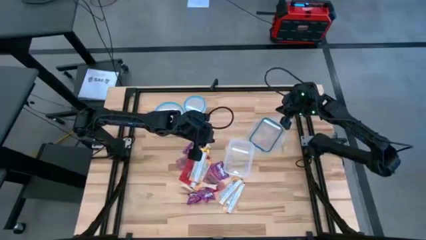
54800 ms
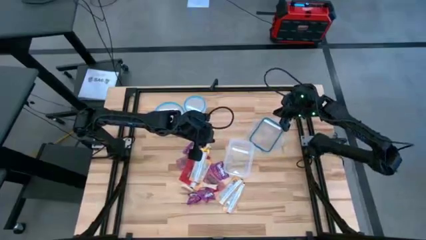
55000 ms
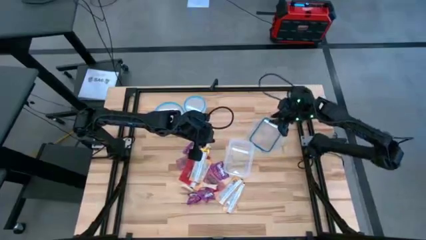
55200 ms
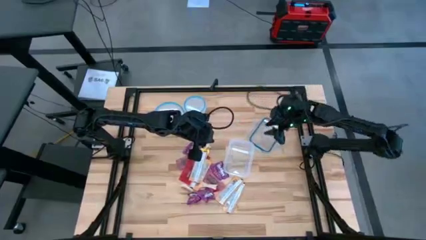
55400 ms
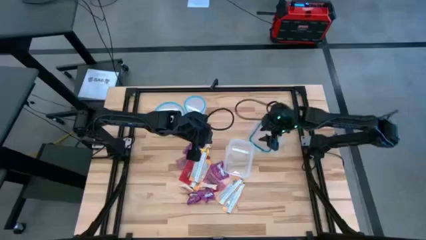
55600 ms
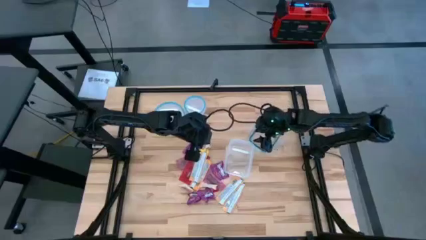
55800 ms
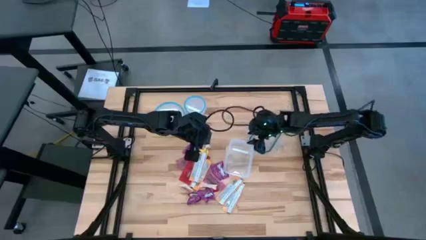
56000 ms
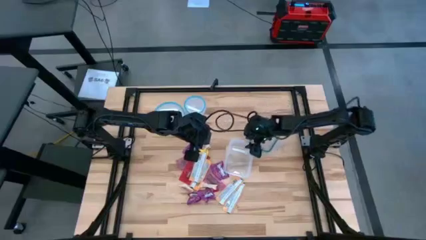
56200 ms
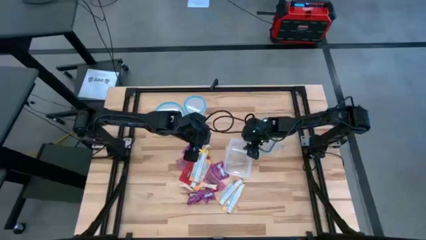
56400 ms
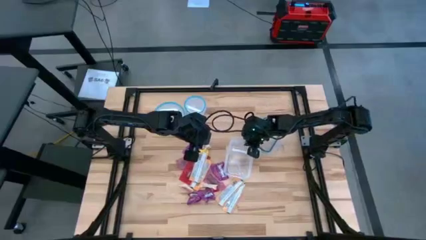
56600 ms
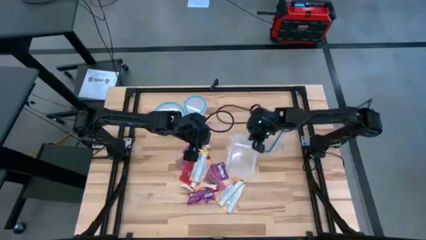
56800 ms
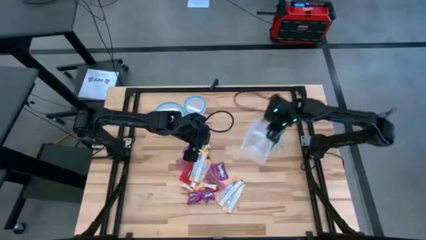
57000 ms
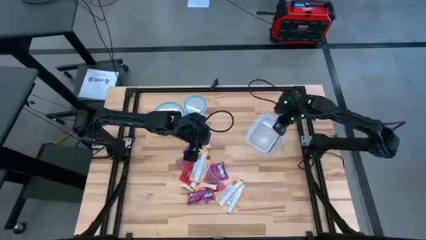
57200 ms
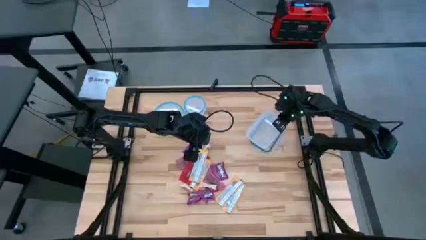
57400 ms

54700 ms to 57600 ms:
Task: Sort candy
Put the rectangular transparent bin on top of its lid

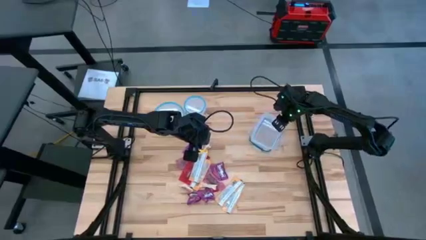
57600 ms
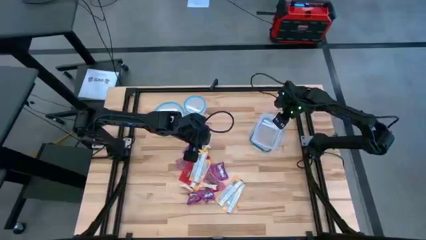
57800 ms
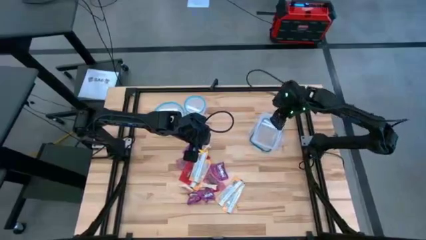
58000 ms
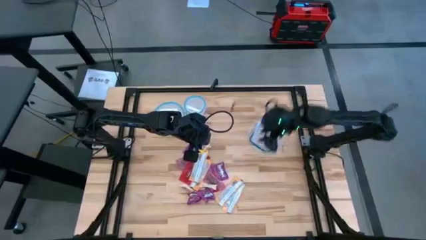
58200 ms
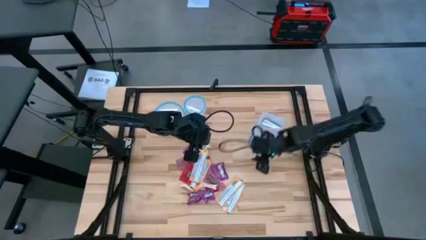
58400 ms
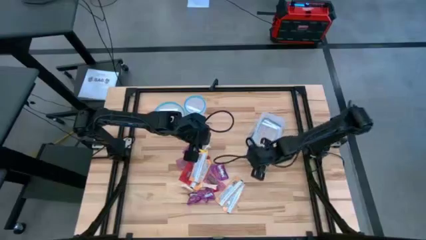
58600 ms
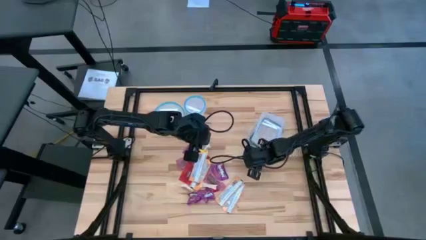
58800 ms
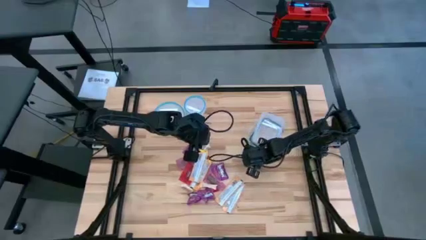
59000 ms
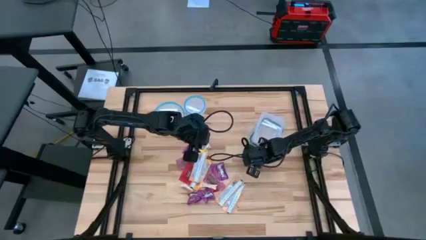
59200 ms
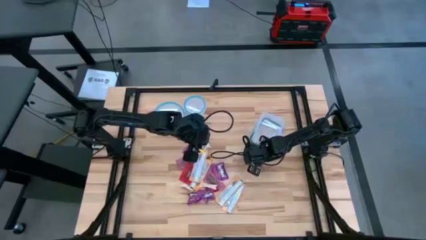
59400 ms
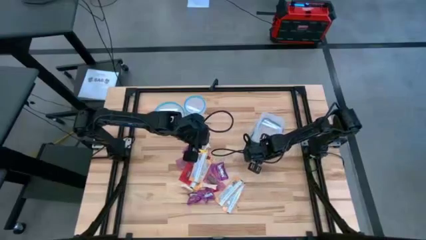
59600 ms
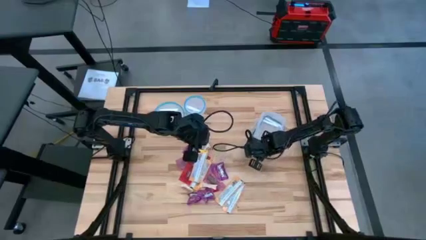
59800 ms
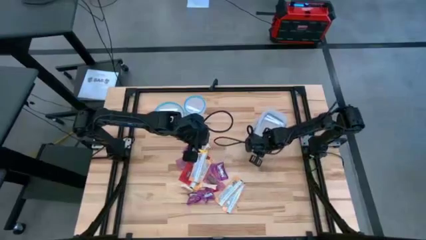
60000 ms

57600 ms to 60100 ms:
Adjust the rectangular transparent bin close to the right corner

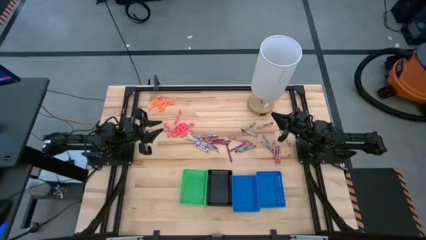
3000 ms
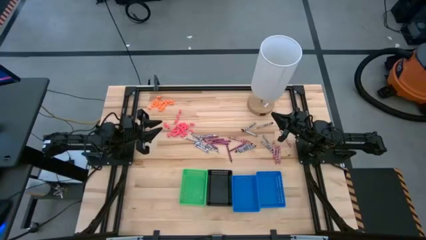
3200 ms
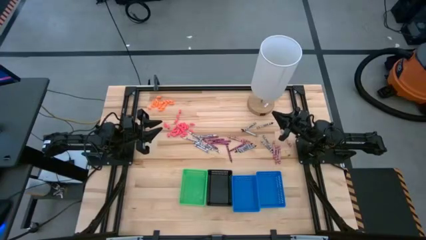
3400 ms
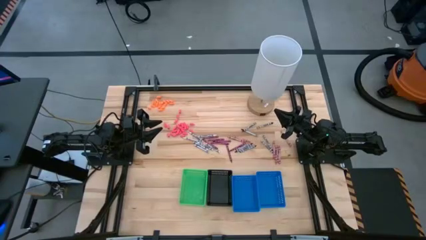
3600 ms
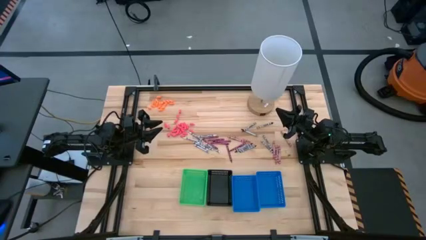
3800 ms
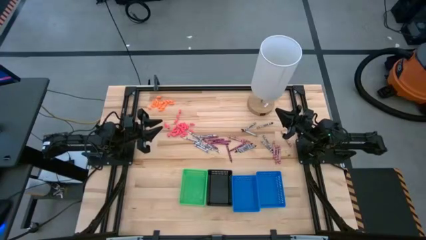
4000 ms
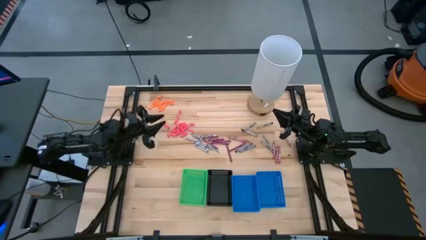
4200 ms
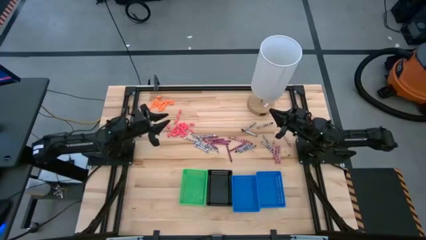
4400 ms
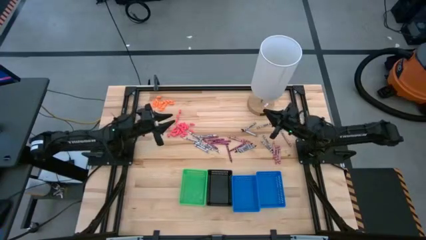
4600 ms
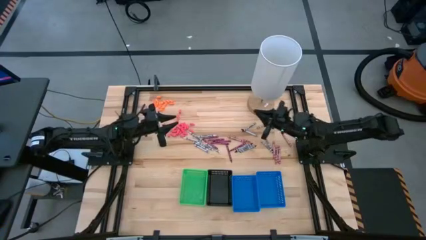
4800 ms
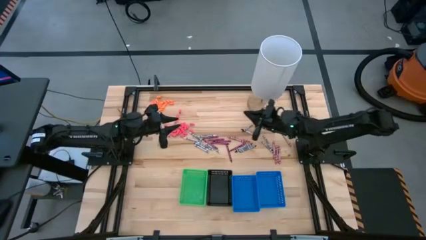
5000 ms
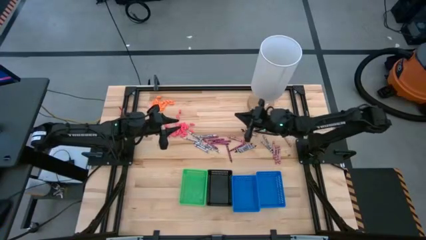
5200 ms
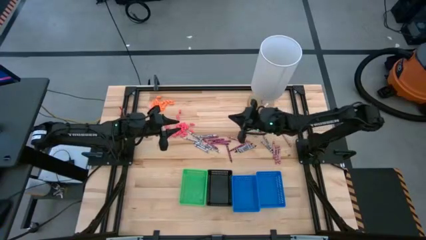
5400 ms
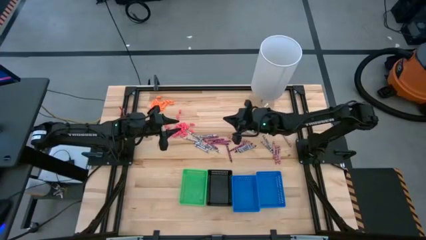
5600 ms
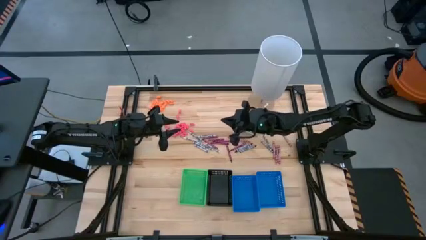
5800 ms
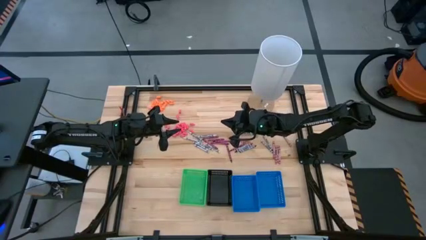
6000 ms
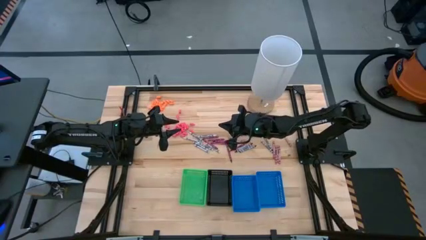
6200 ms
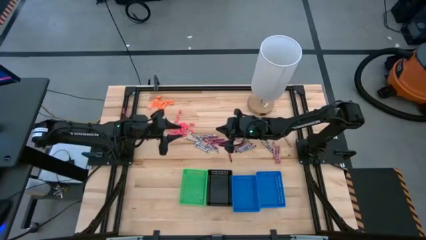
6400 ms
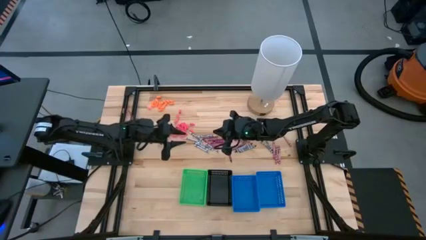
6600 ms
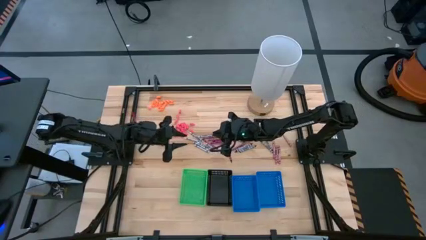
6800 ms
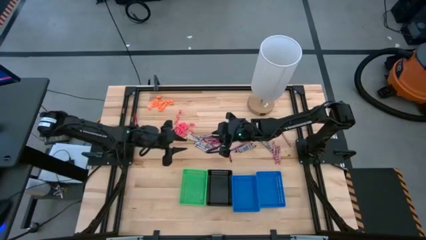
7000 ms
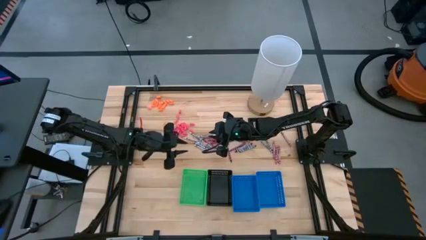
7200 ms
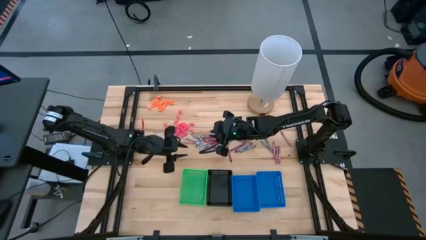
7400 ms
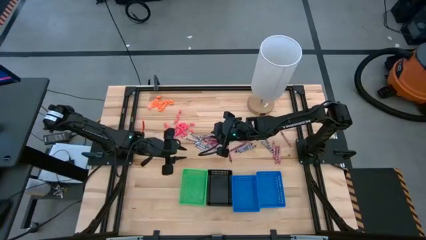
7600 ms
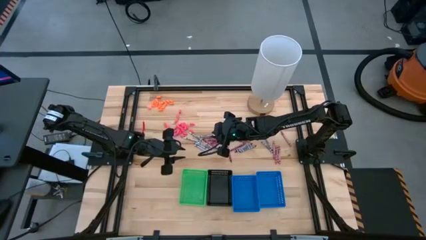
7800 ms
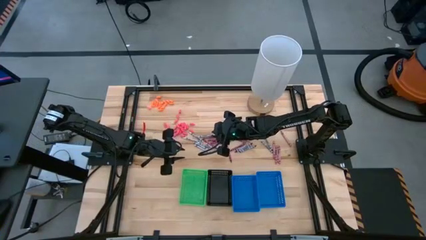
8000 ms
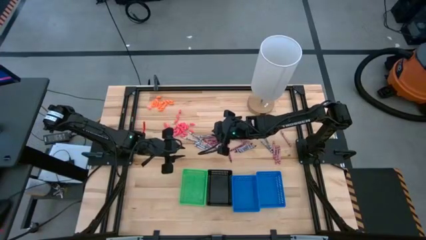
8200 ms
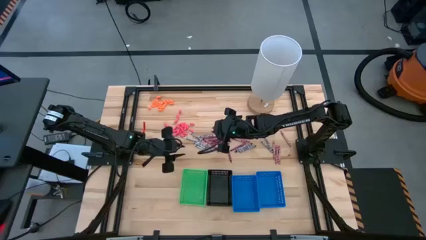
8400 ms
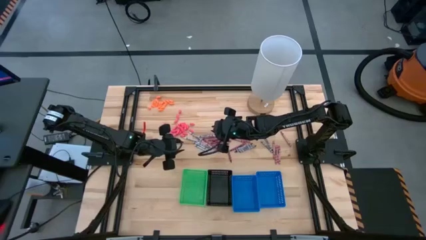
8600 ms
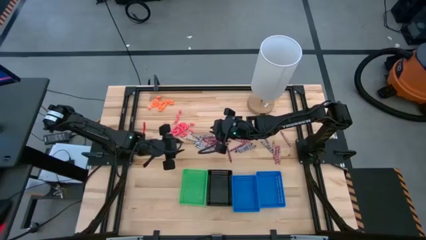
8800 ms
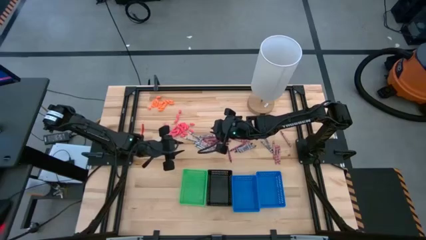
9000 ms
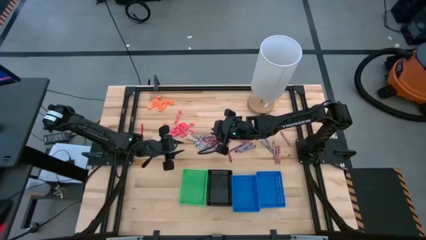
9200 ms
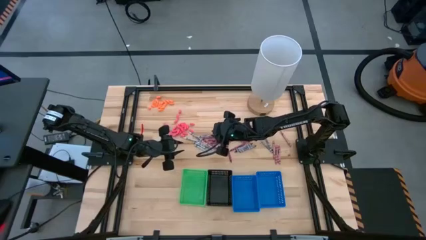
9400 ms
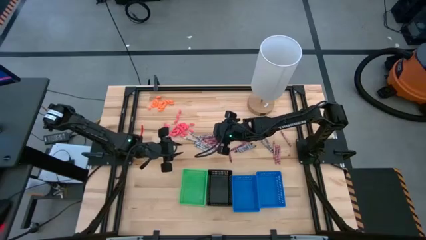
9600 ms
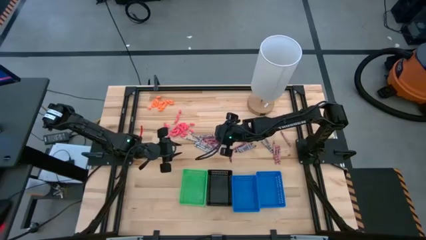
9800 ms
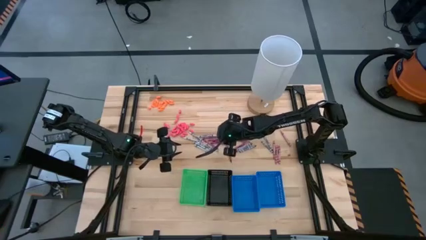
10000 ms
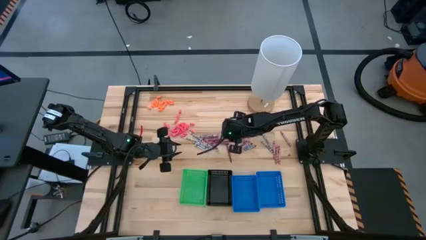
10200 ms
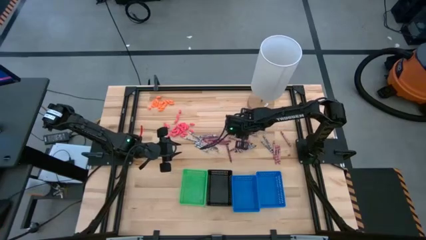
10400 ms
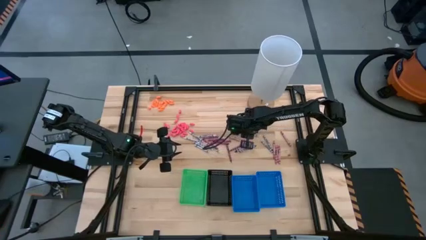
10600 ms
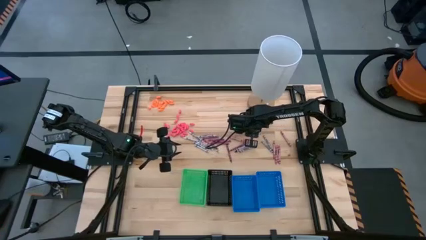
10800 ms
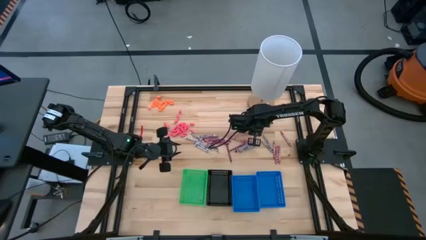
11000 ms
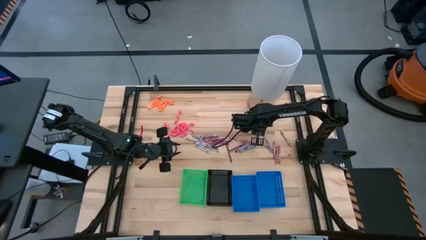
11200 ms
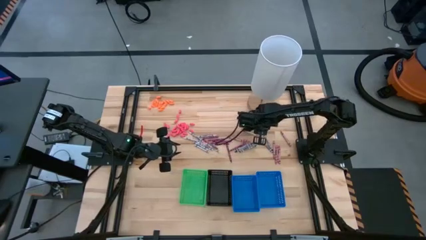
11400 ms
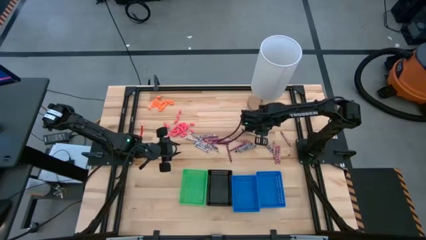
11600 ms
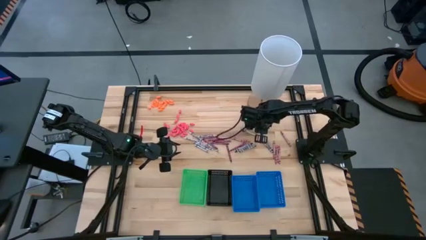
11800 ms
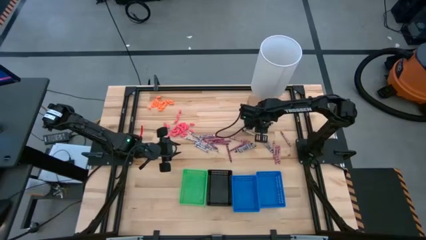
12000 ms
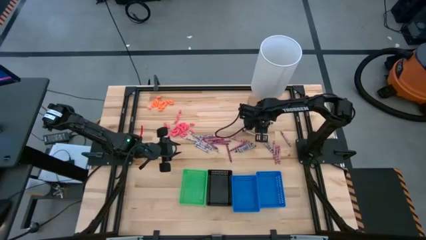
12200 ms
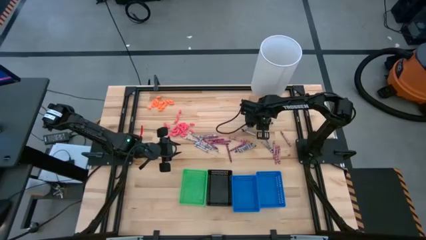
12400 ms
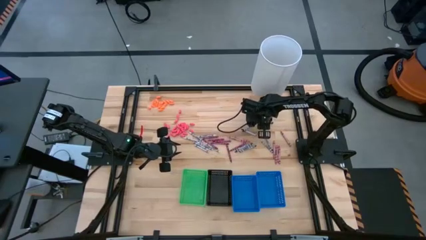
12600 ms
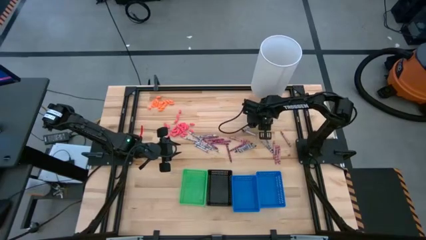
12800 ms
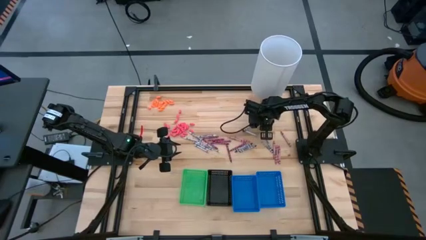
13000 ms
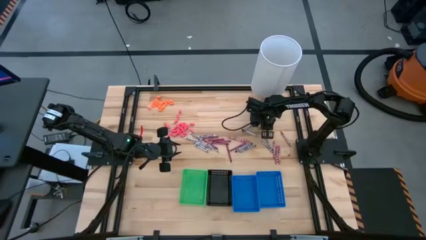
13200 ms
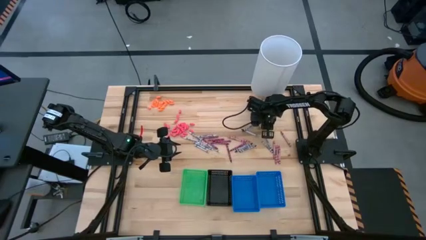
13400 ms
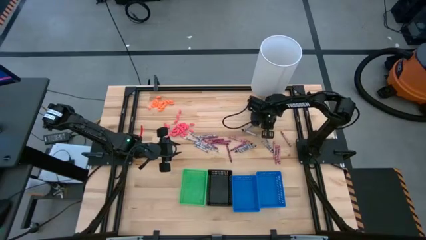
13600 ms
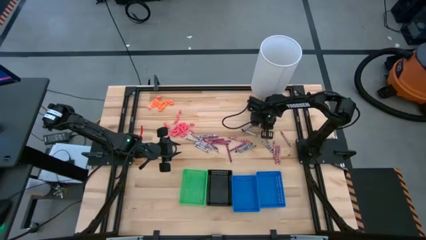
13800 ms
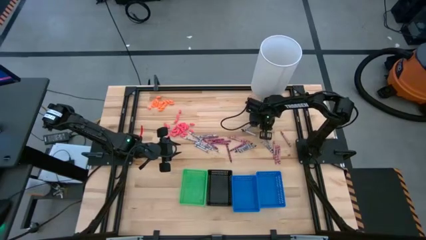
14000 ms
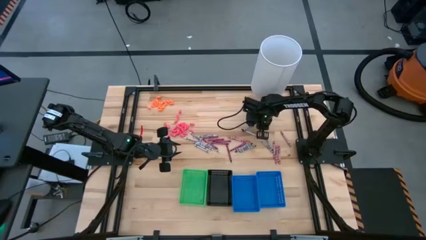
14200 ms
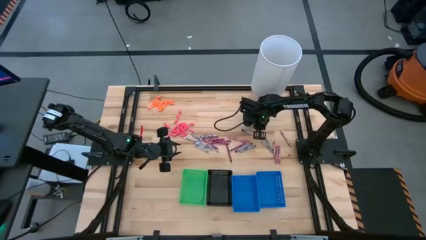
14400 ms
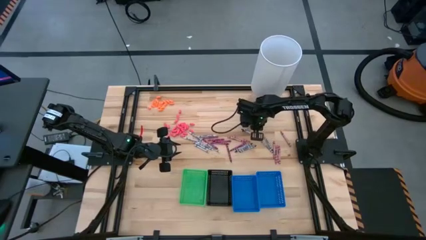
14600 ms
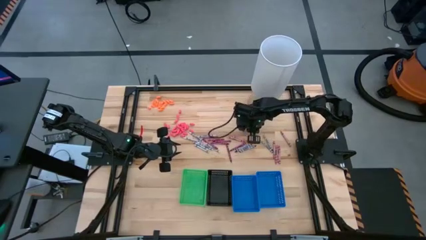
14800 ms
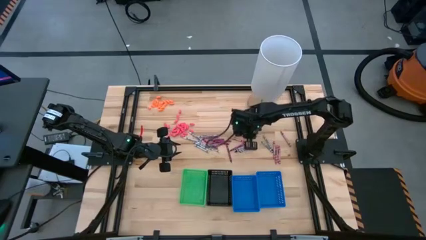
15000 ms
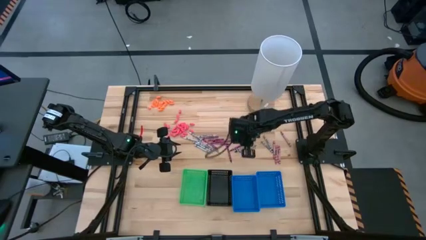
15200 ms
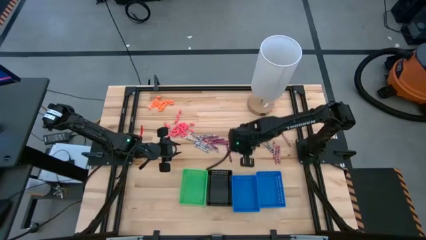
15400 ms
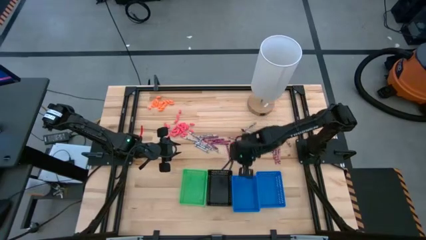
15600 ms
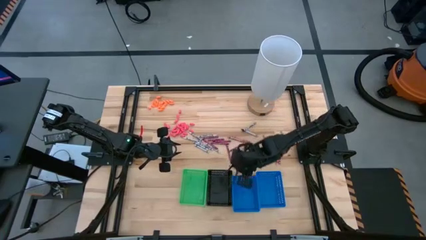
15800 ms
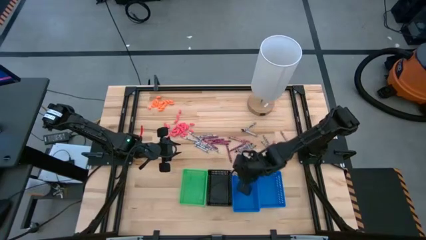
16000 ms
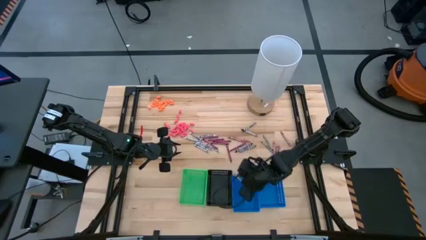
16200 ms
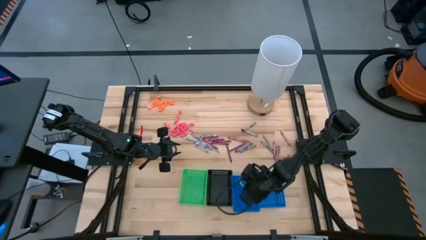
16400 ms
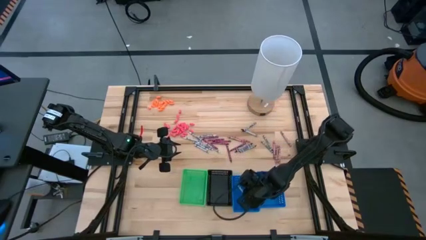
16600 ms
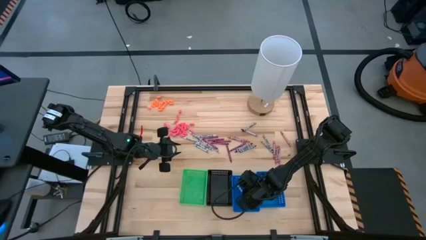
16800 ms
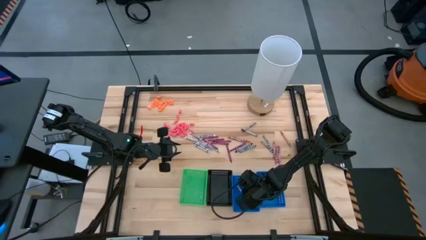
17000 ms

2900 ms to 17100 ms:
Task: Sort crayons
Put the black crayon into the left blue bin
